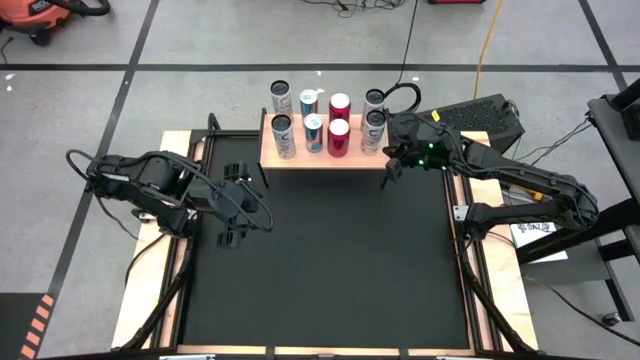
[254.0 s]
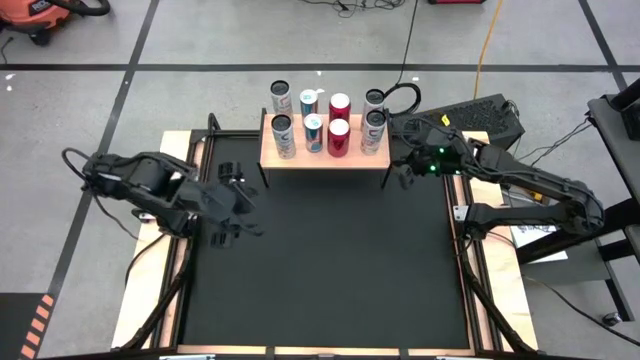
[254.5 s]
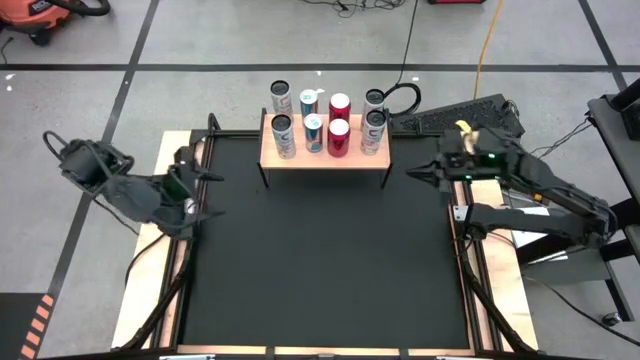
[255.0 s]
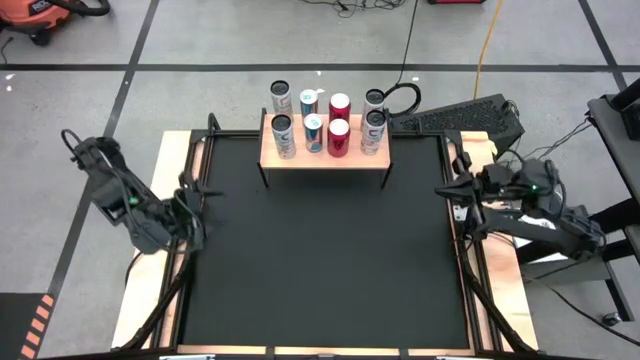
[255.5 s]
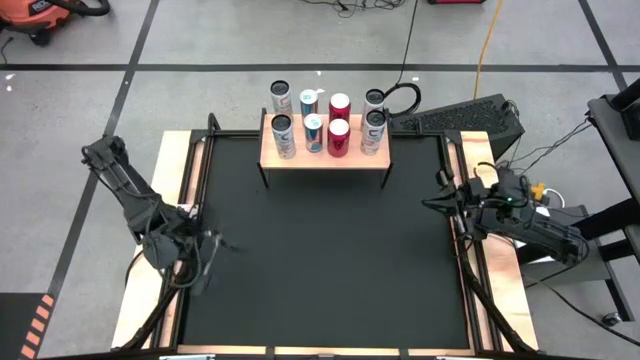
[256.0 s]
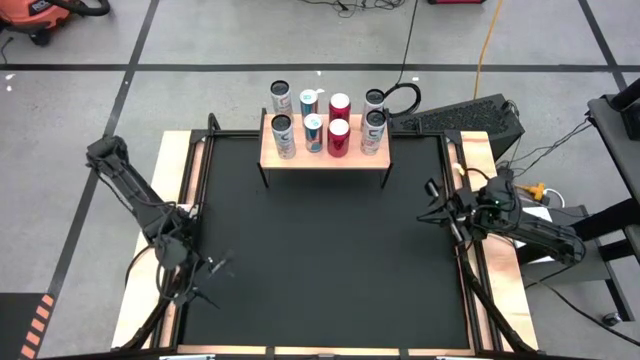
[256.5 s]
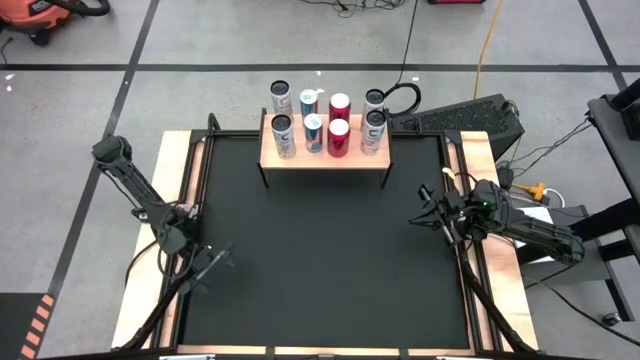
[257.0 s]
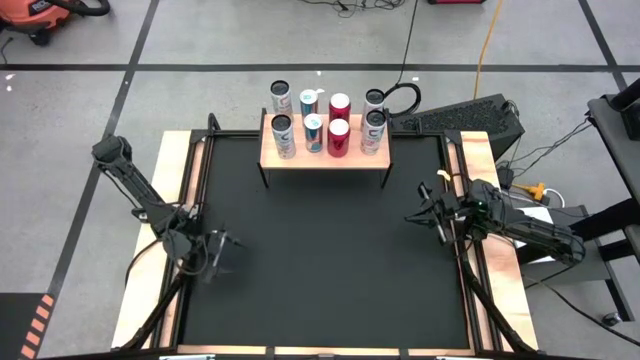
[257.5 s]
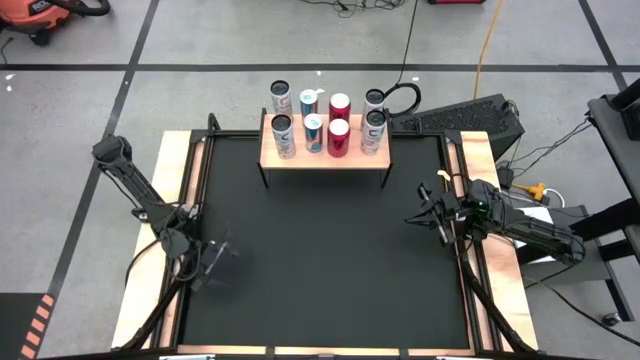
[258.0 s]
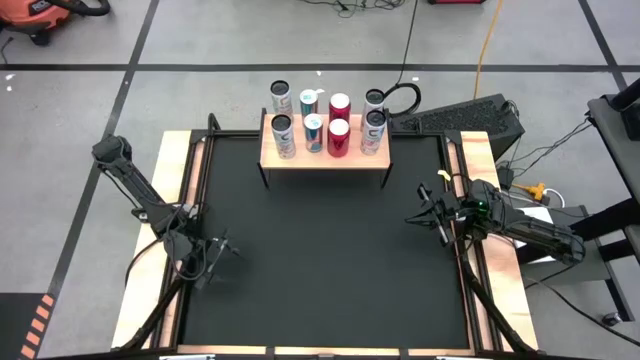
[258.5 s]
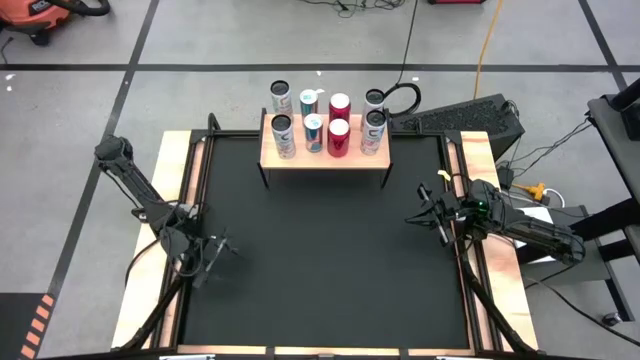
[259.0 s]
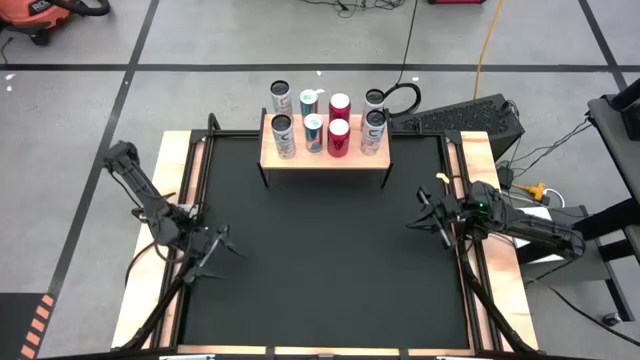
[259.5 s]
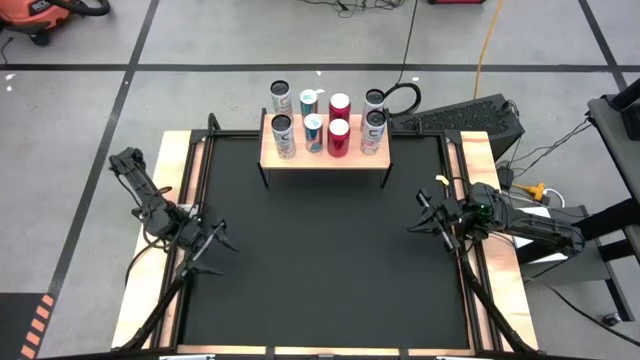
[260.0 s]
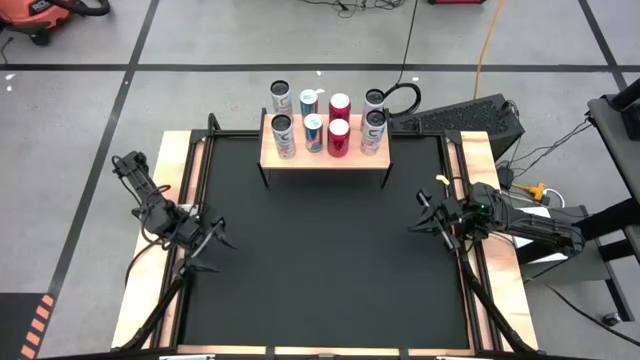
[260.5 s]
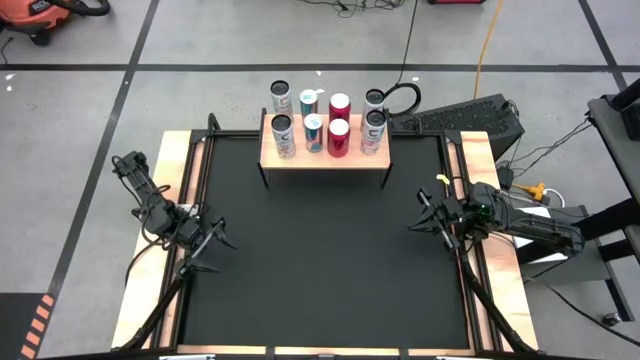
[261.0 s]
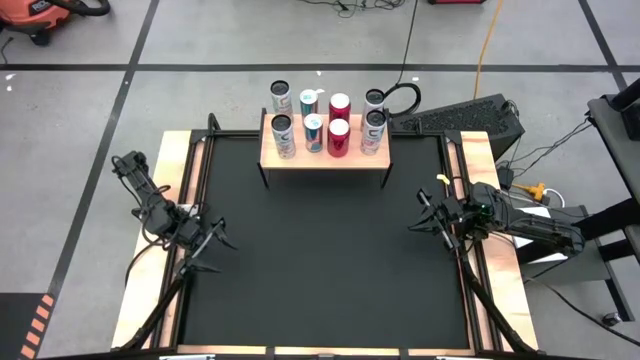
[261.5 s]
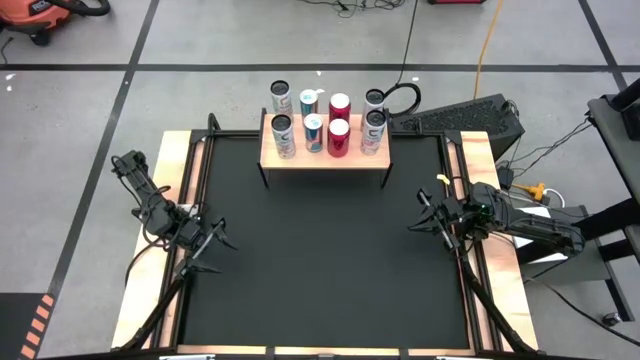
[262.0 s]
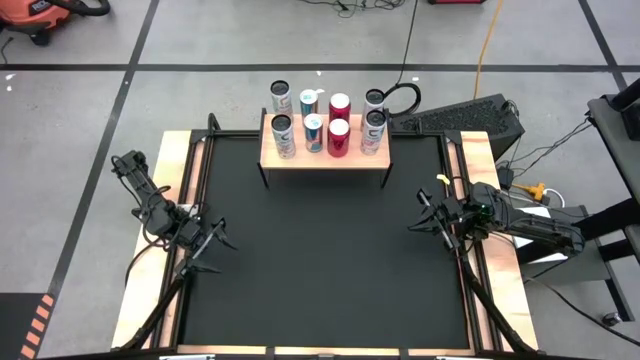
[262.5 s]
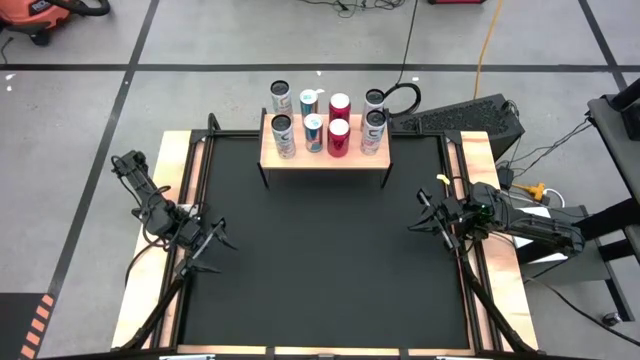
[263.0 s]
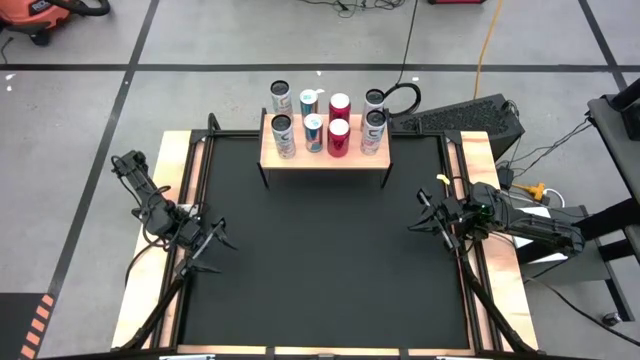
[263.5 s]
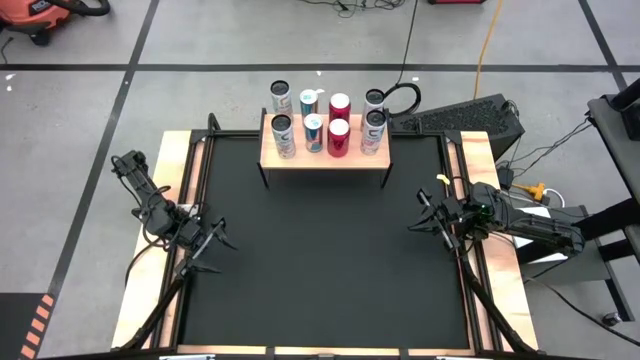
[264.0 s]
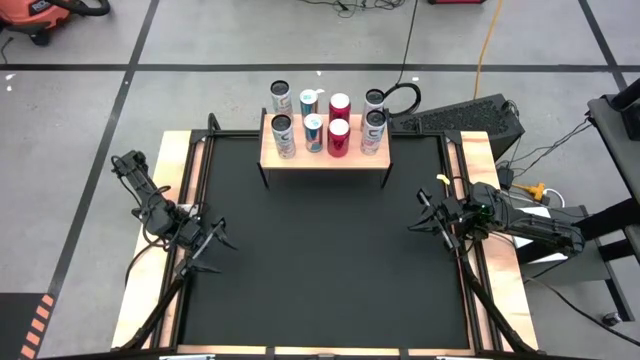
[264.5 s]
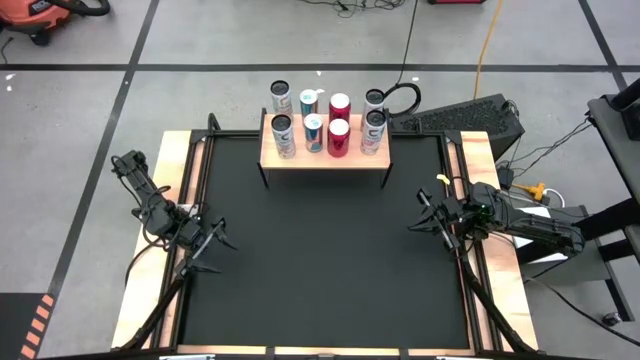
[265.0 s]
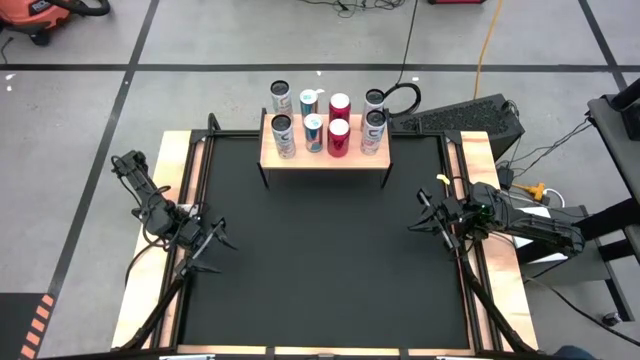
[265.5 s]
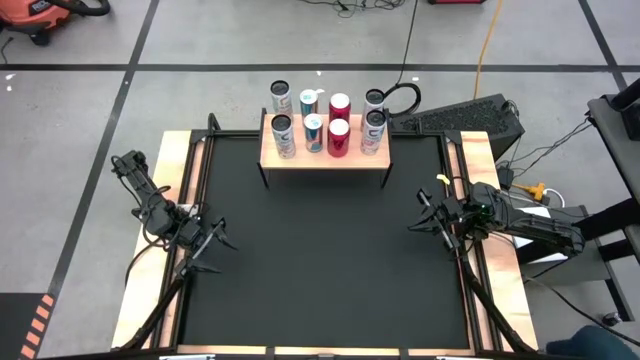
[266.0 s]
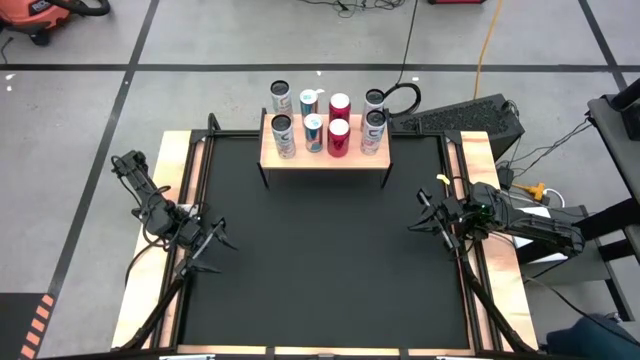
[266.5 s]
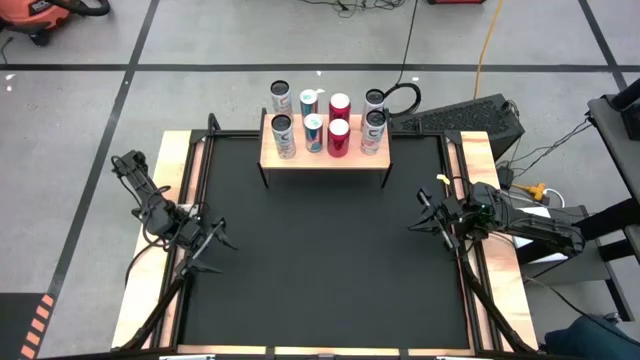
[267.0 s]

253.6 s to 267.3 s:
Task: Place canned beverage on shelf
Return to Home Position

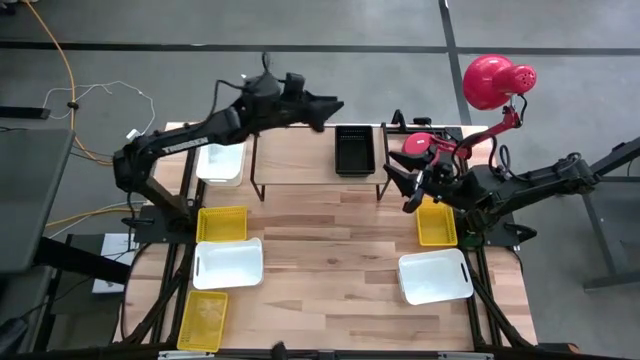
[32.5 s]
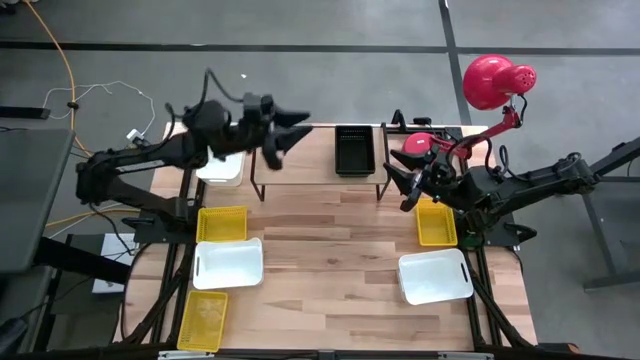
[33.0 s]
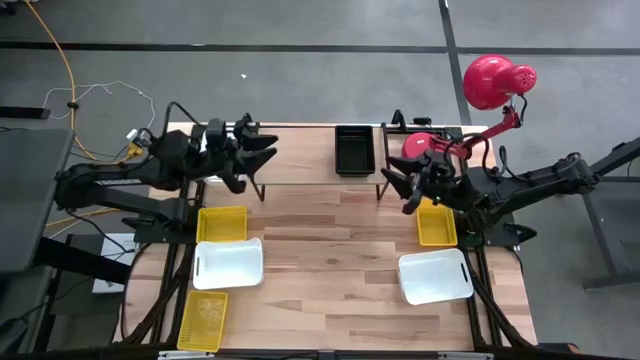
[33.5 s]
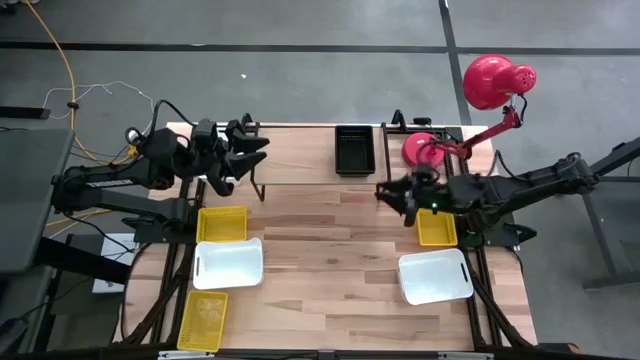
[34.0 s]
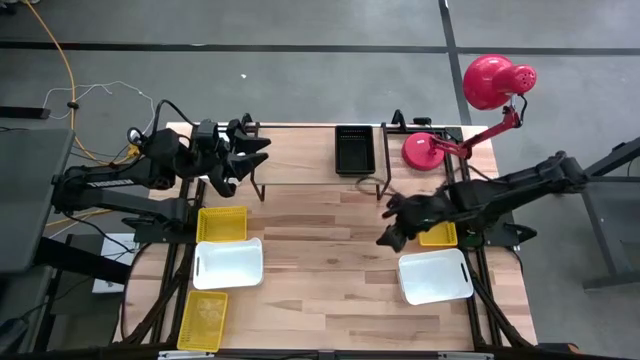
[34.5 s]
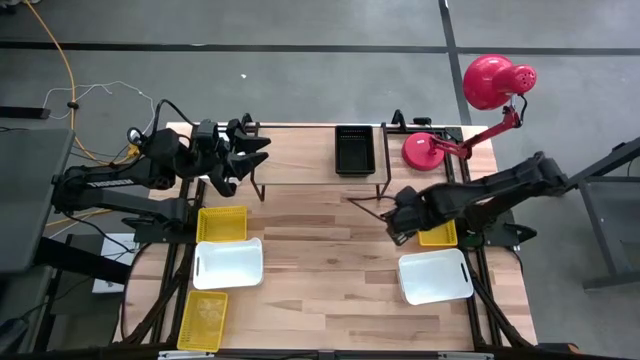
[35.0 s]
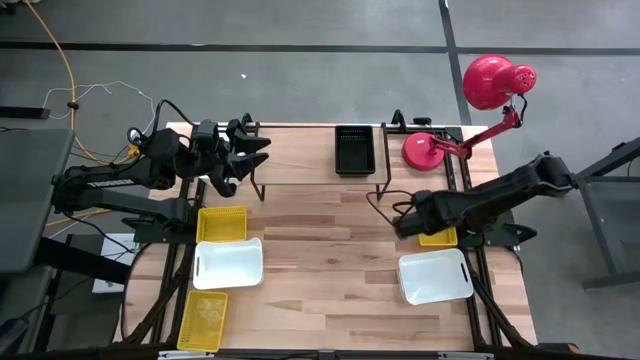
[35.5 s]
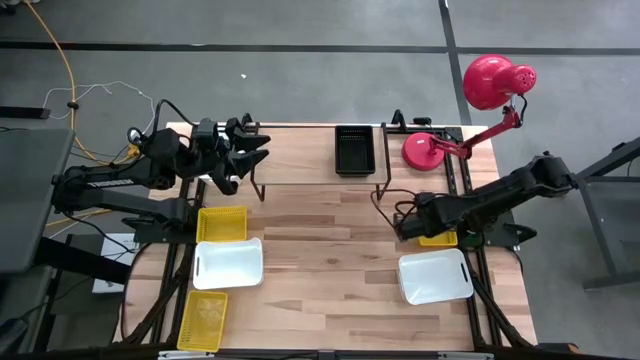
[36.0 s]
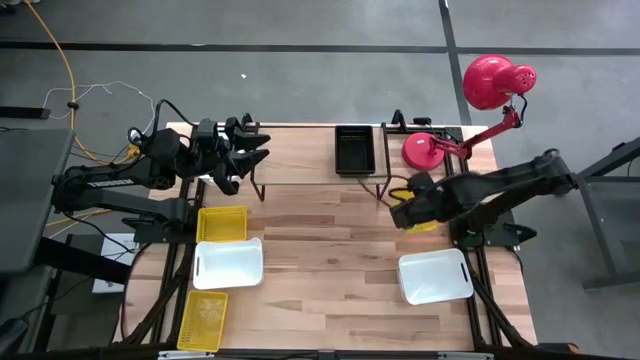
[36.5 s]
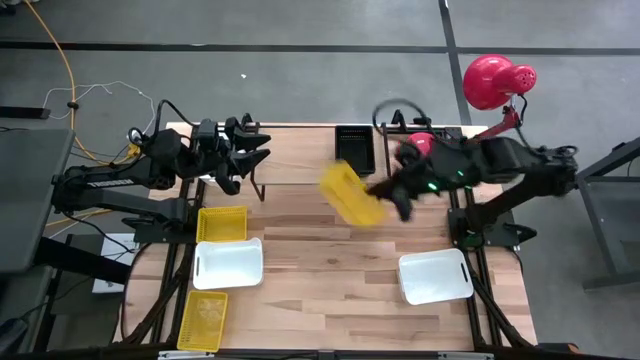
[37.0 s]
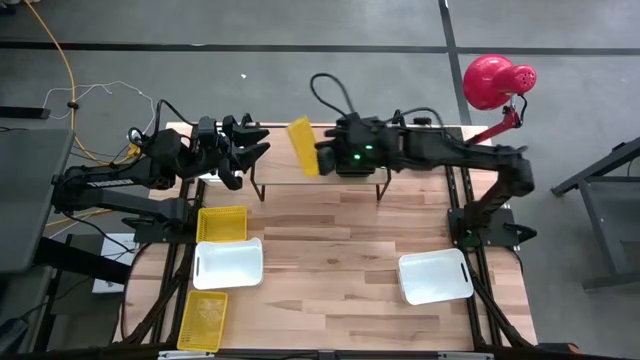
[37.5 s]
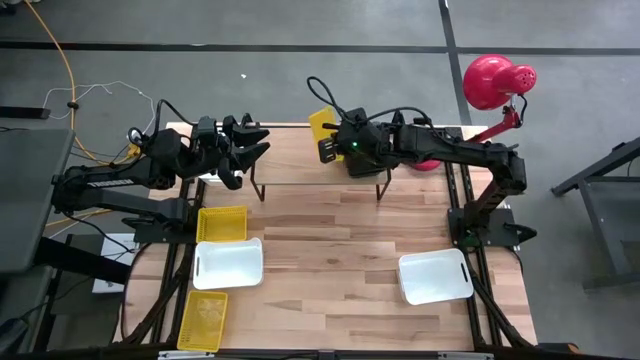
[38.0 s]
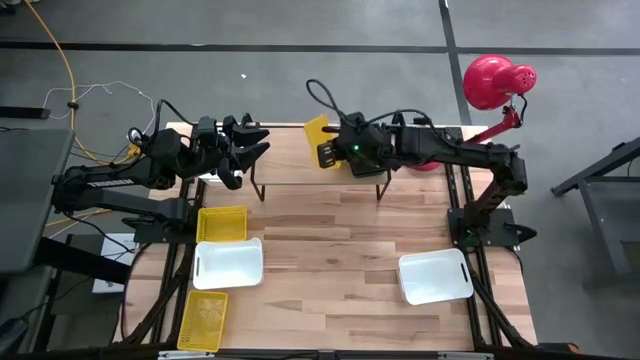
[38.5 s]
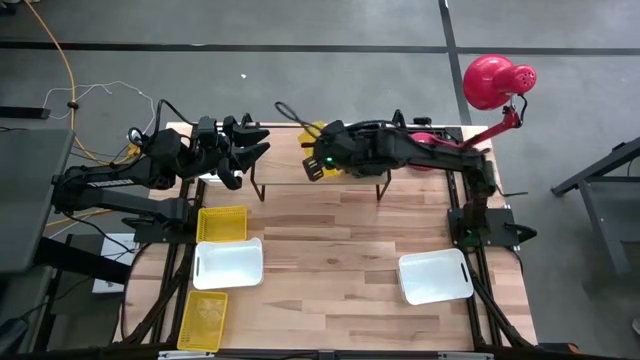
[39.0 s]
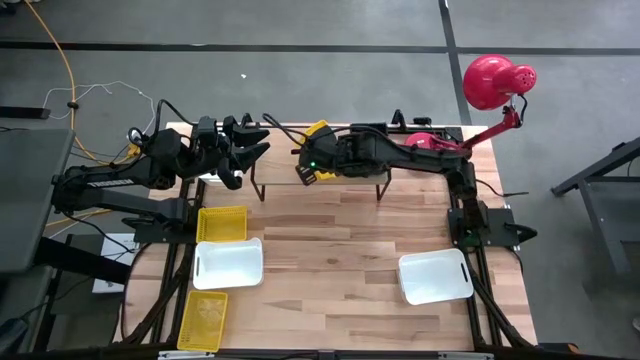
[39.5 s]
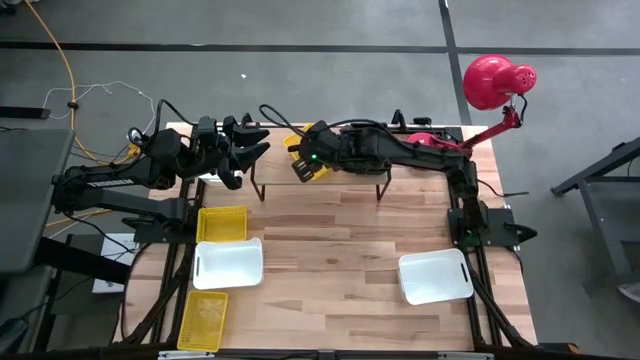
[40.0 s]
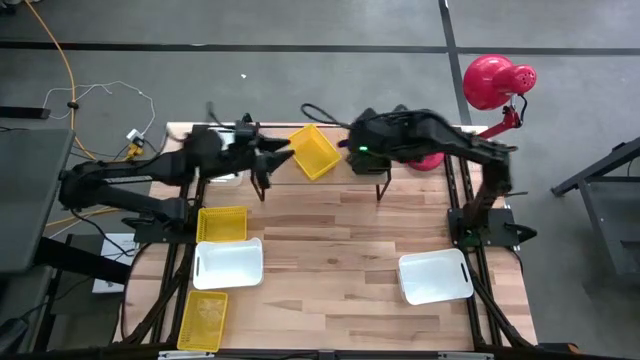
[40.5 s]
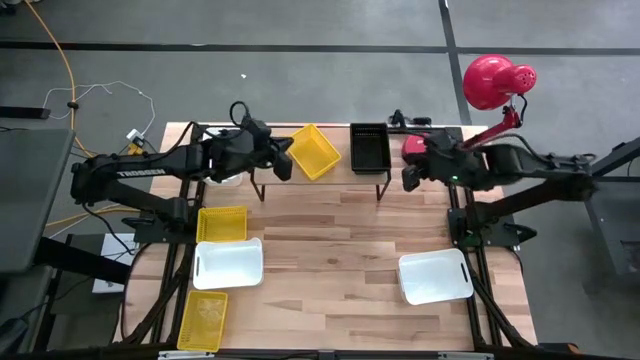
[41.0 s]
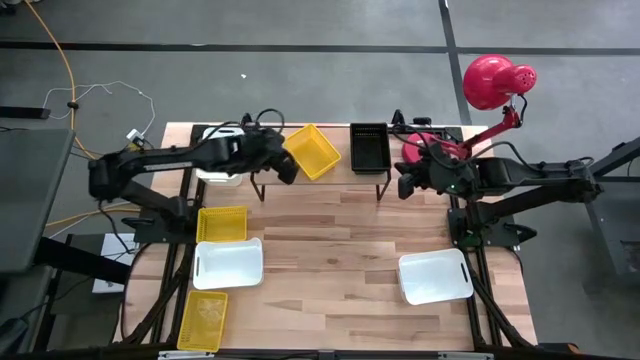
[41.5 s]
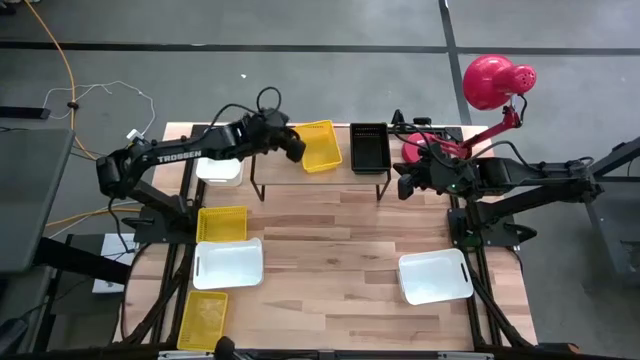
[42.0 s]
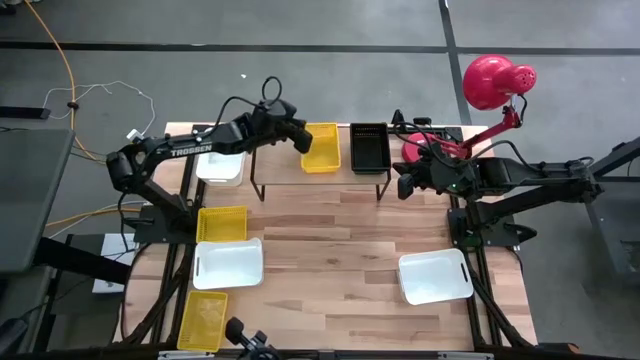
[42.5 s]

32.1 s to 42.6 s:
Task: Stack baskets on shelf by color
Put the top right yellow bin on the shelf
